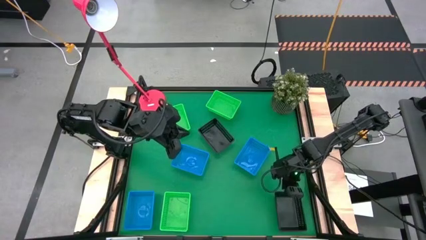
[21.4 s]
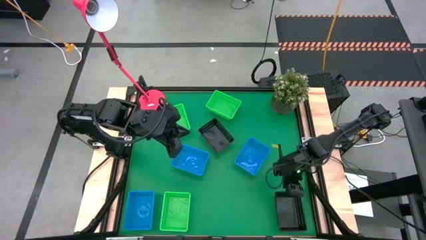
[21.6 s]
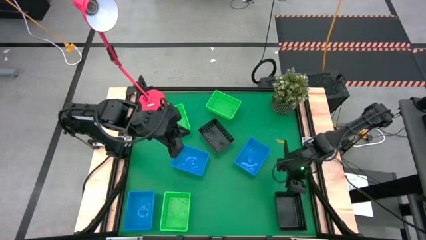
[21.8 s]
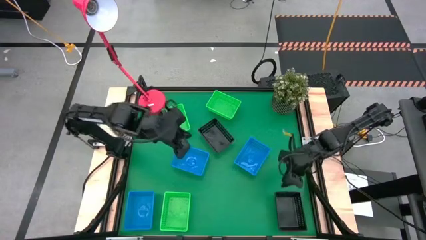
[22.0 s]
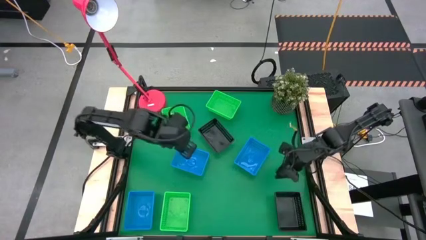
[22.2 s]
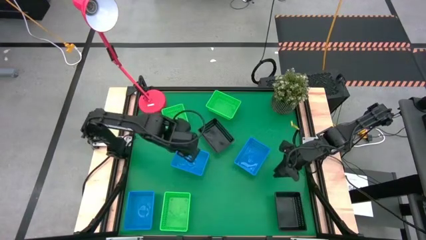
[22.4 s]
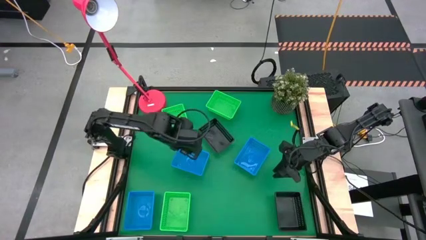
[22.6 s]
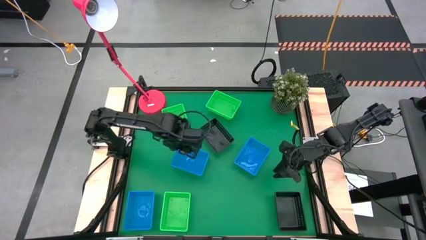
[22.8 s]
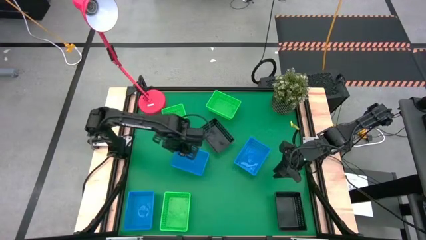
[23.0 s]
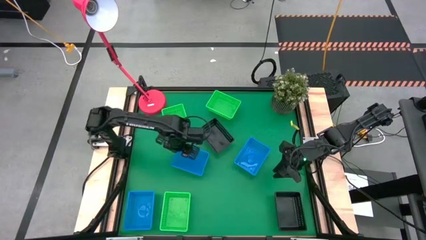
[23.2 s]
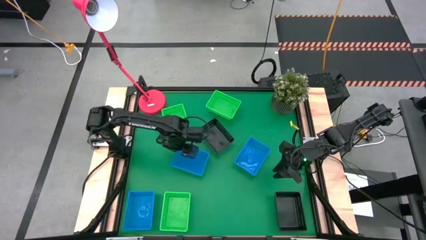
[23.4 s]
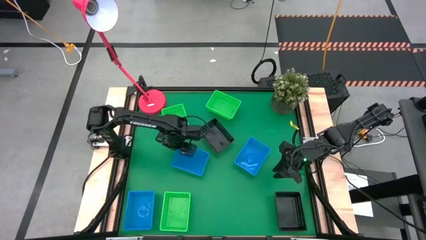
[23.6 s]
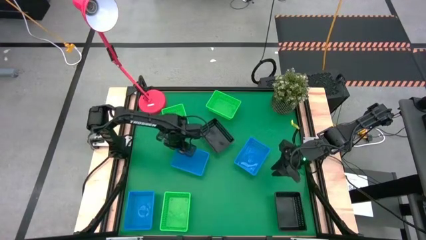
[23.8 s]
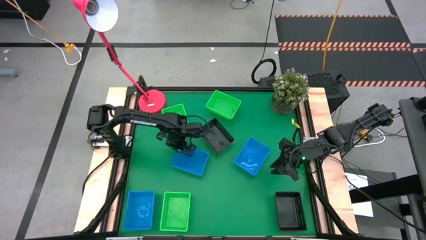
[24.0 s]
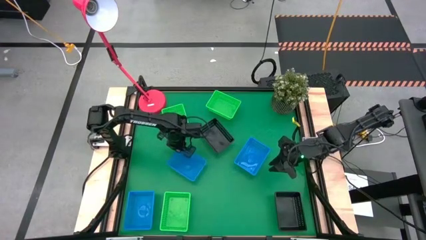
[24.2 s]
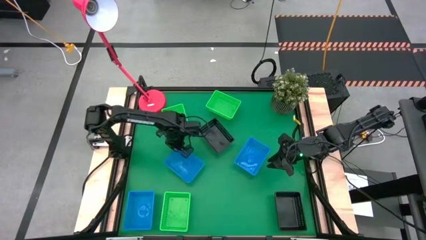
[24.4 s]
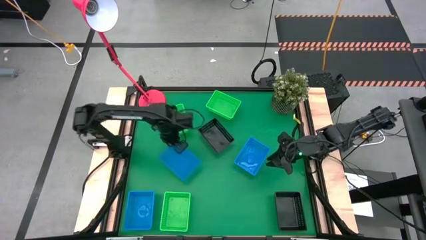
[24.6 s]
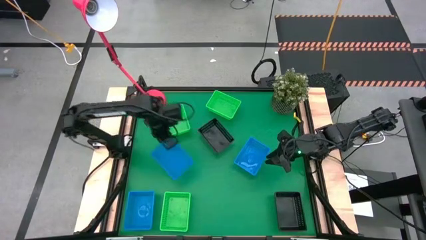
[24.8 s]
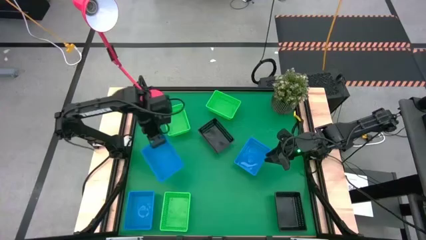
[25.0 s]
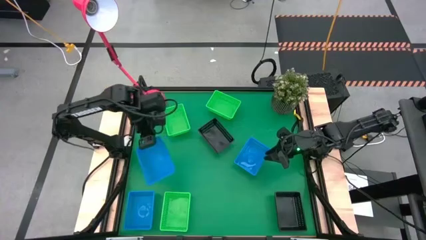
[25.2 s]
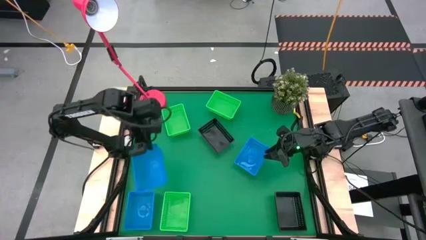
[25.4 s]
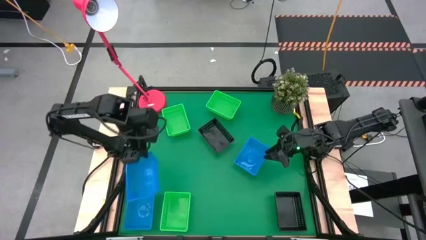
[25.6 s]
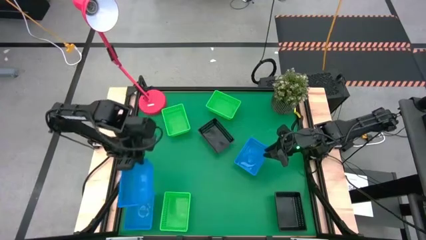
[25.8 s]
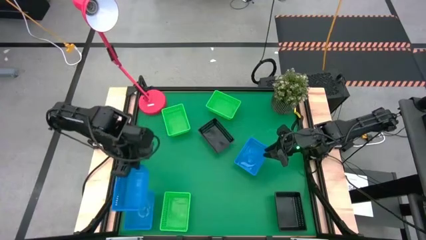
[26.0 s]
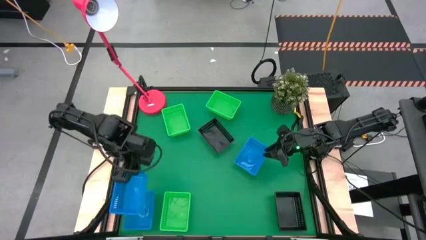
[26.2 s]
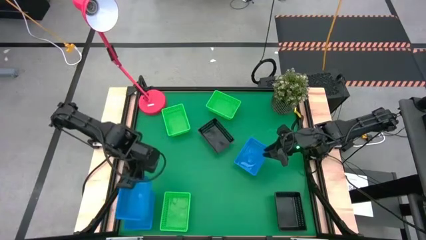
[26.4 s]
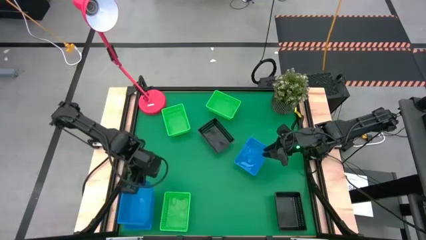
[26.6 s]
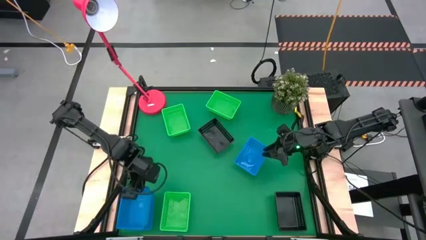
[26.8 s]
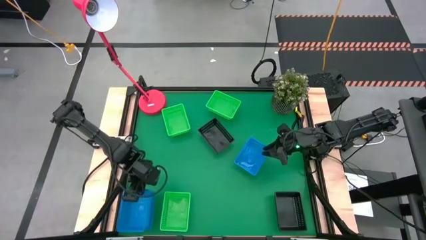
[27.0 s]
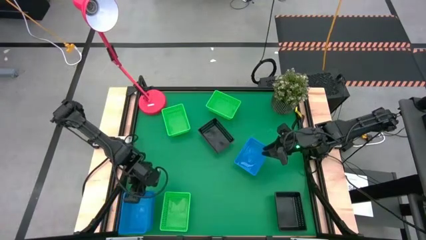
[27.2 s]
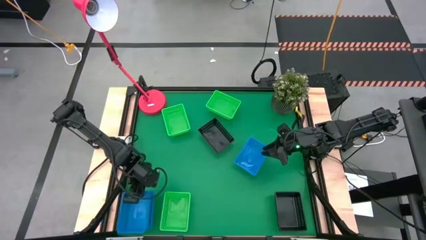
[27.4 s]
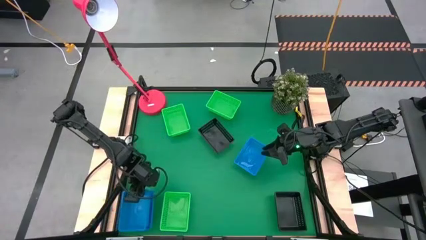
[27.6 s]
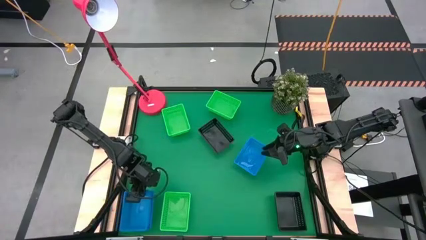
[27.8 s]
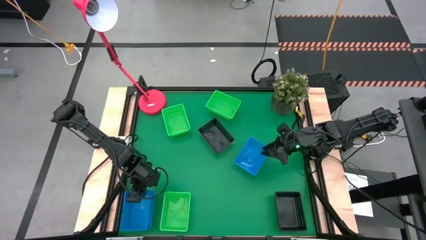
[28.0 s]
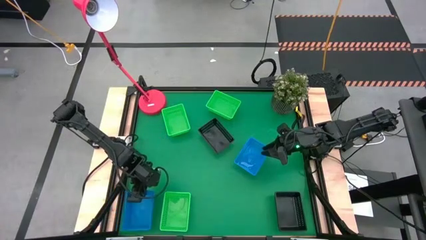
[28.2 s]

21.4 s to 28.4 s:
Stack the top left blue bin on top of the bottom blue bin

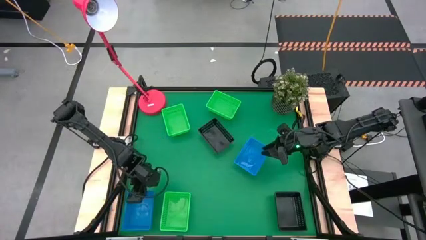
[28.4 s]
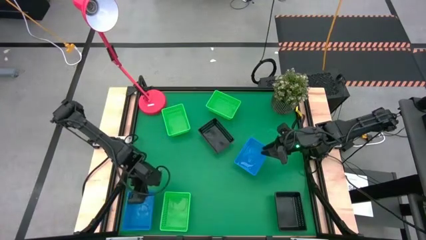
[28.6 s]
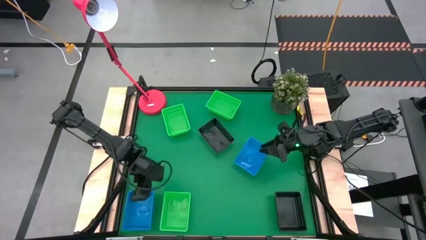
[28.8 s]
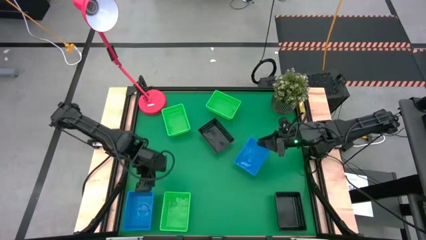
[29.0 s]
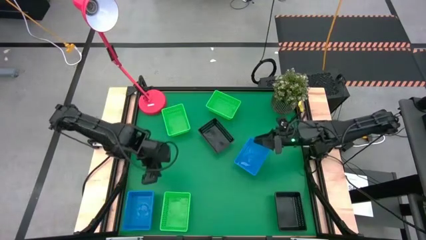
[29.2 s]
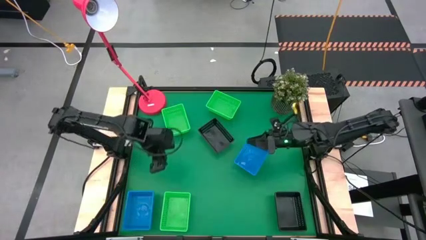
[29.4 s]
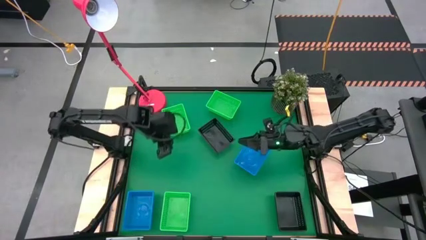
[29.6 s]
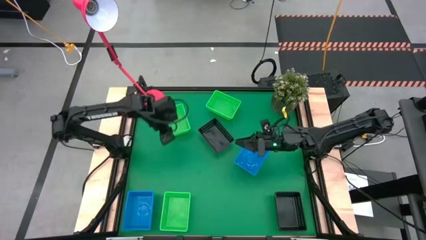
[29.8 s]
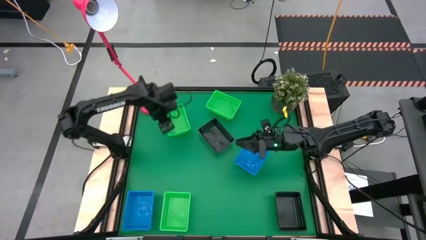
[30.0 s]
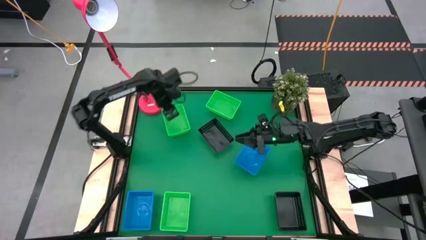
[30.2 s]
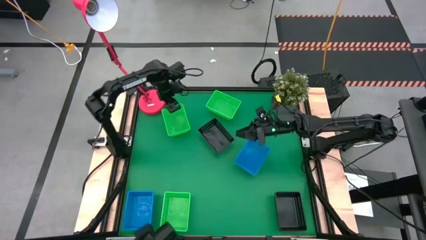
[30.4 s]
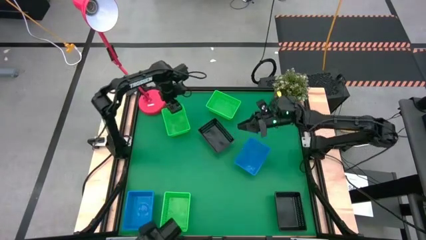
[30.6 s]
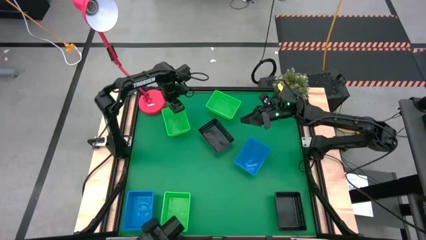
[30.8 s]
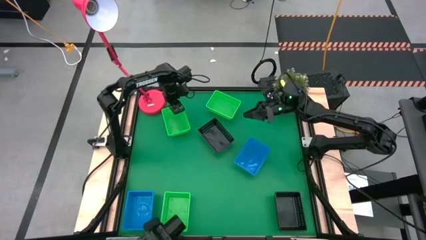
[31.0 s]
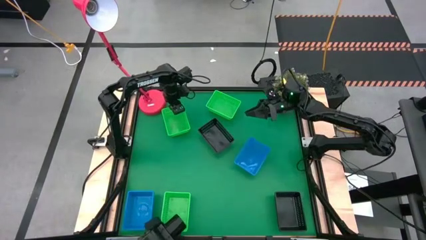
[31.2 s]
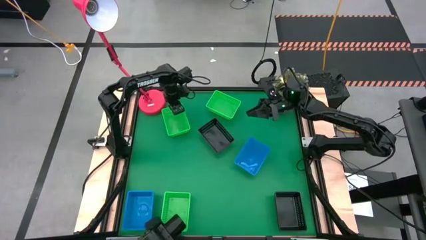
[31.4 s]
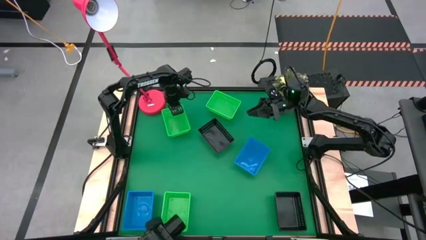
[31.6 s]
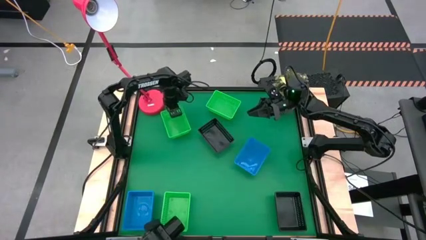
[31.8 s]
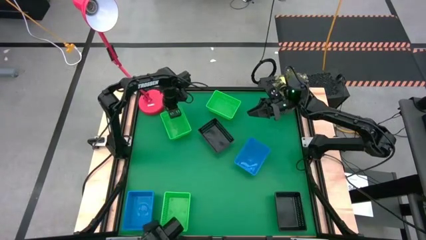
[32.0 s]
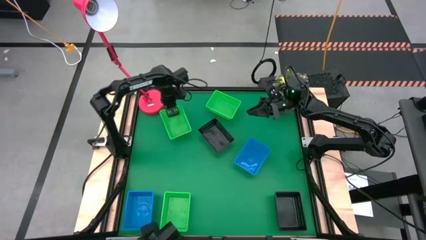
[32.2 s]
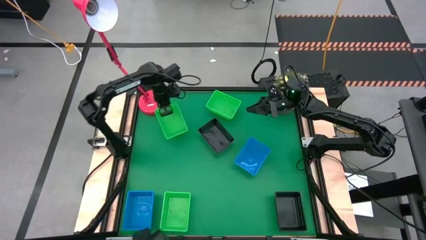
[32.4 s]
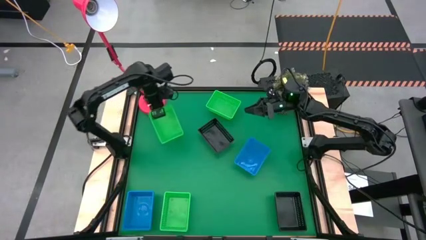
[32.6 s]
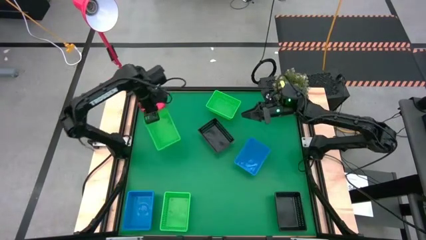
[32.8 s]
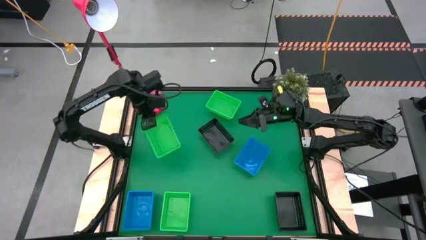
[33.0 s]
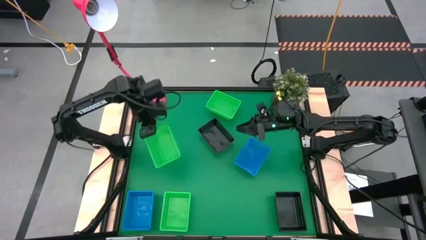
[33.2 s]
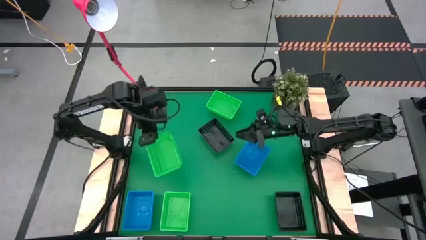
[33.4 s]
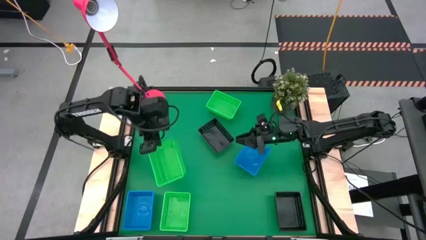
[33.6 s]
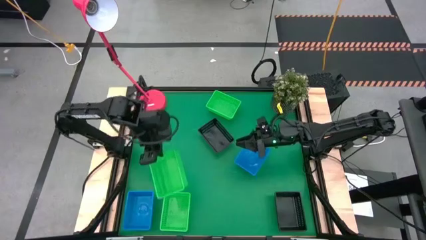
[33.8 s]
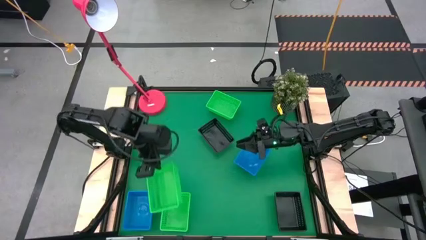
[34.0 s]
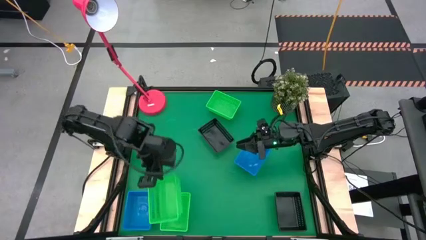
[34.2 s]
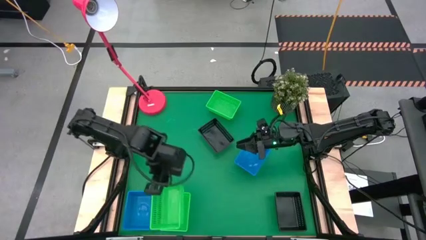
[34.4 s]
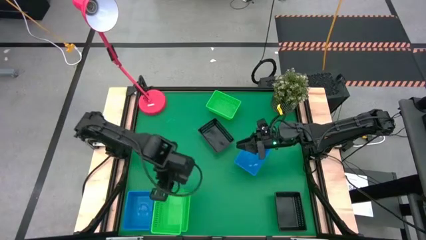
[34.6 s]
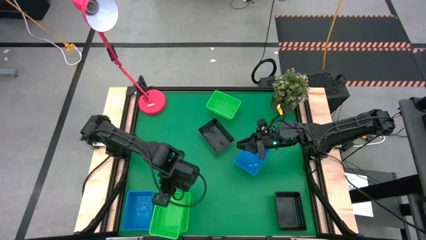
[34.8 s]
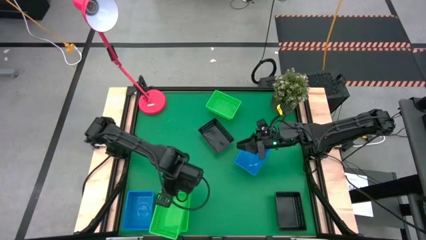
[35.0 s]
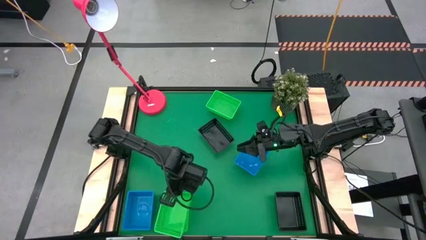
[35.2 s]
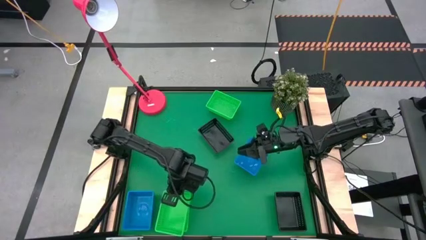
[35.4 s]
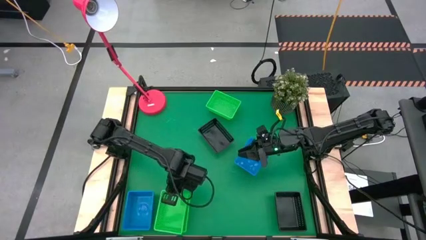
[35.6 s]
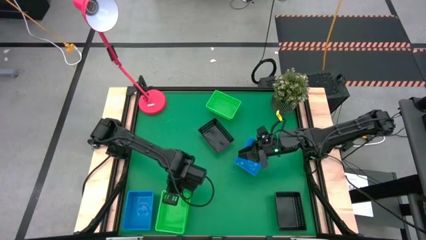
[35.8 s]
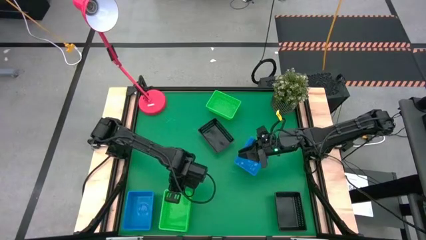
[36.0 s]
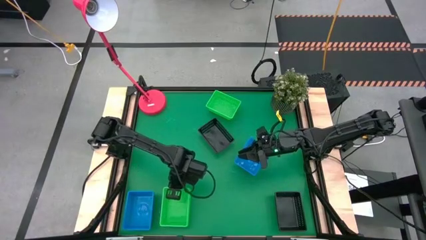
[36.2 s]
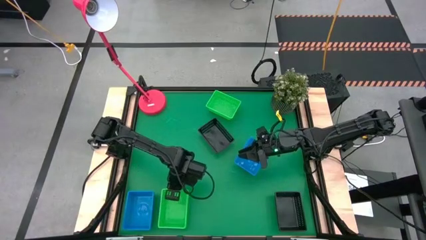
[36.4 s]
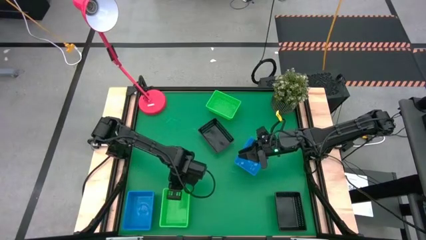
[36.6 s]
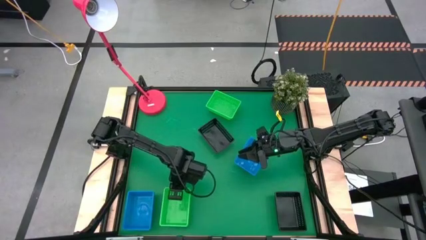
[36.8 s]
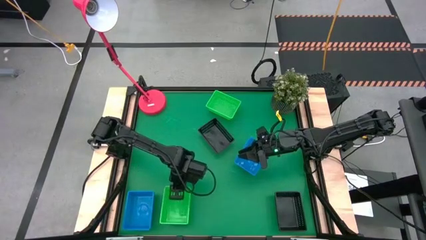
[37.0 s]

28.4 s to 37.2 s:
Stack the top left green bin on top of the bottom green bin
